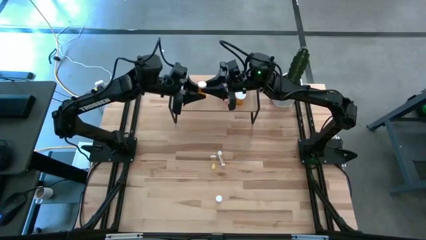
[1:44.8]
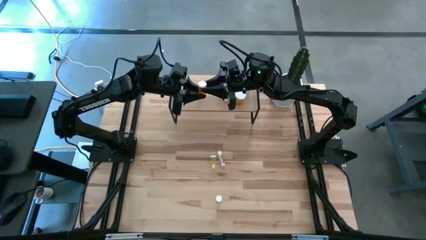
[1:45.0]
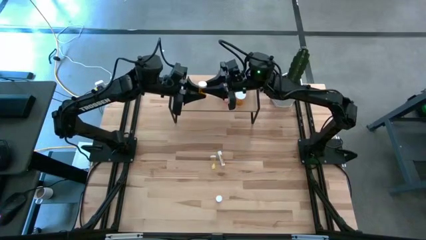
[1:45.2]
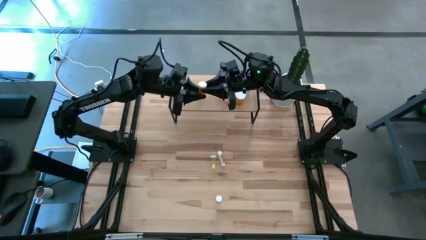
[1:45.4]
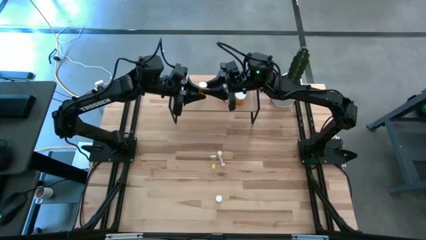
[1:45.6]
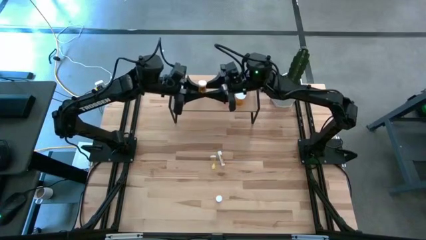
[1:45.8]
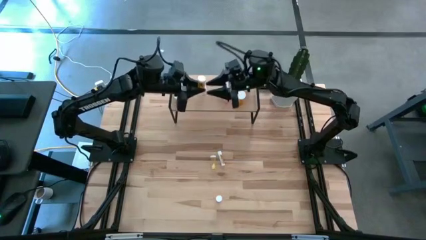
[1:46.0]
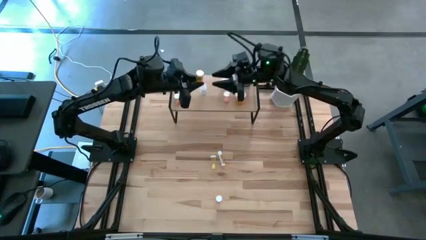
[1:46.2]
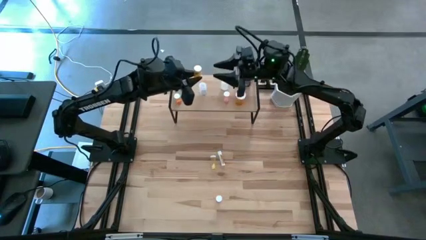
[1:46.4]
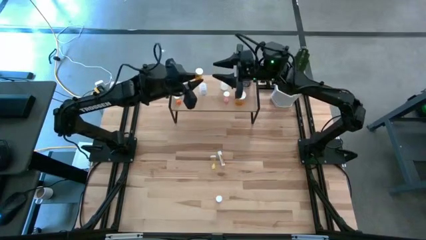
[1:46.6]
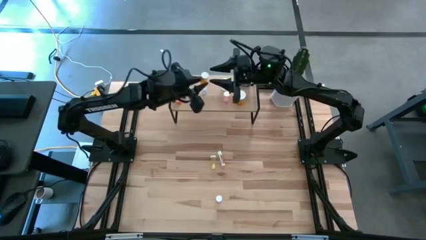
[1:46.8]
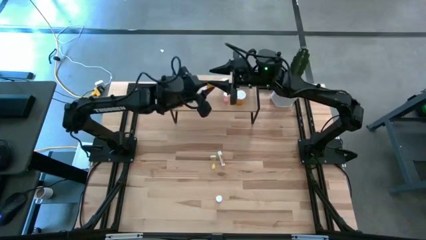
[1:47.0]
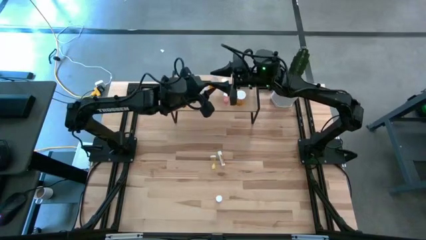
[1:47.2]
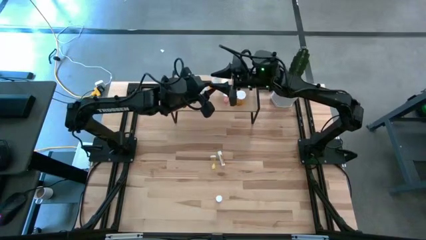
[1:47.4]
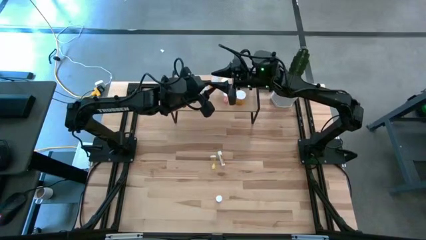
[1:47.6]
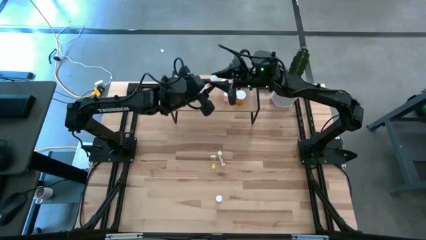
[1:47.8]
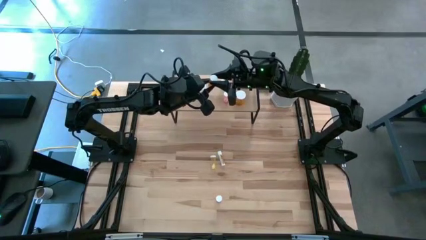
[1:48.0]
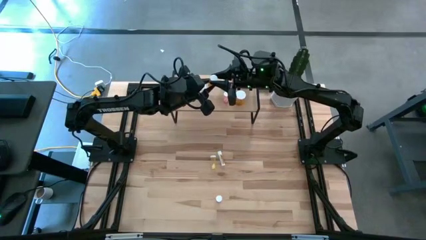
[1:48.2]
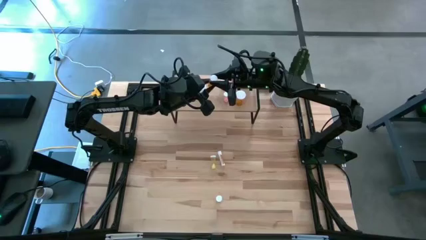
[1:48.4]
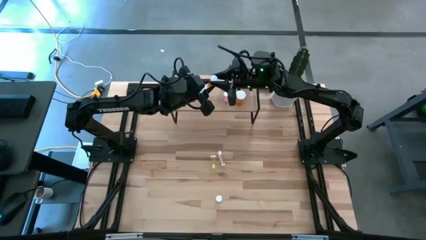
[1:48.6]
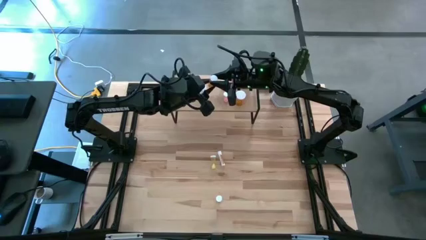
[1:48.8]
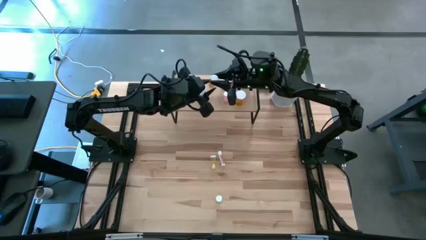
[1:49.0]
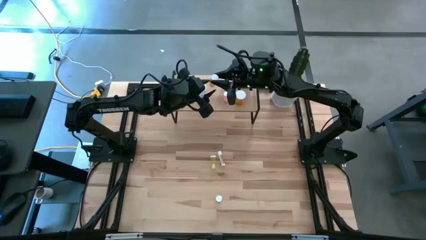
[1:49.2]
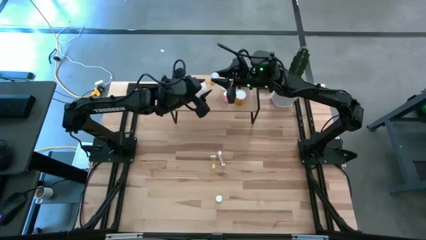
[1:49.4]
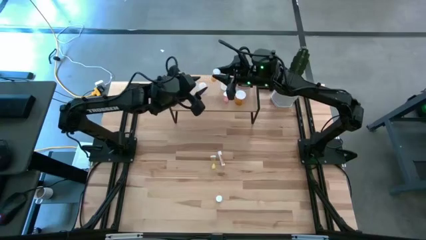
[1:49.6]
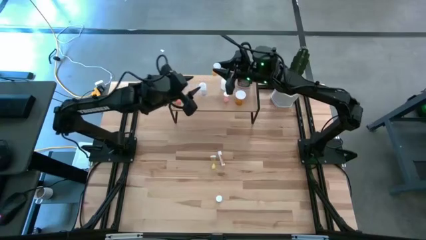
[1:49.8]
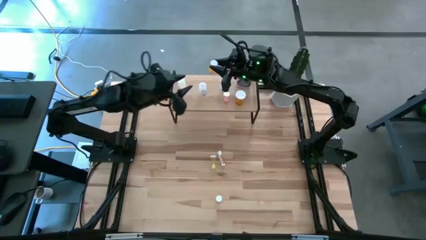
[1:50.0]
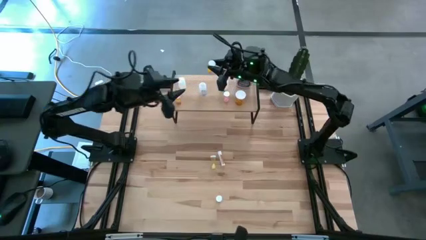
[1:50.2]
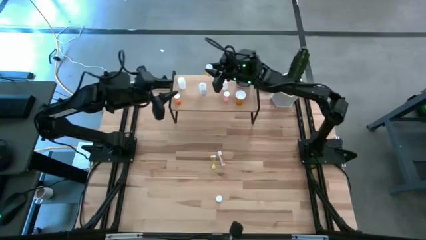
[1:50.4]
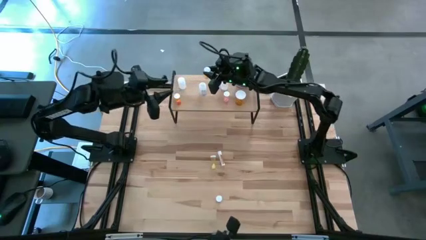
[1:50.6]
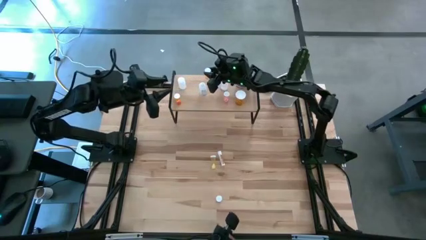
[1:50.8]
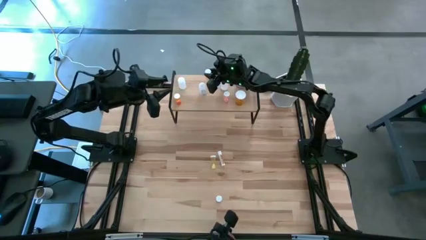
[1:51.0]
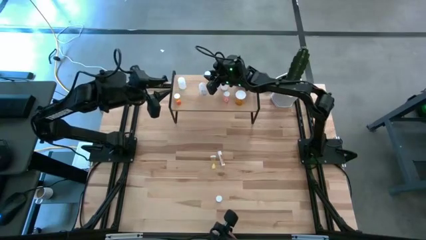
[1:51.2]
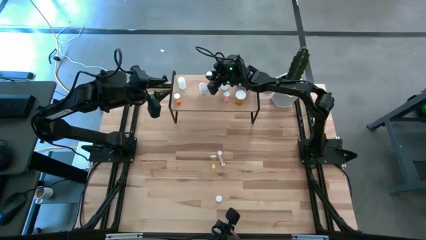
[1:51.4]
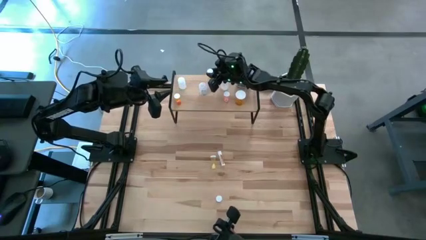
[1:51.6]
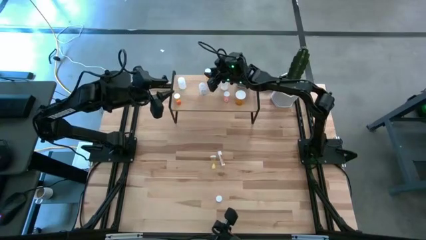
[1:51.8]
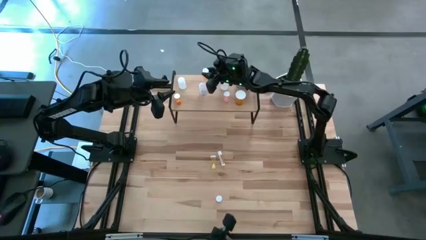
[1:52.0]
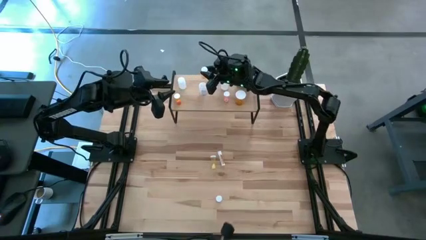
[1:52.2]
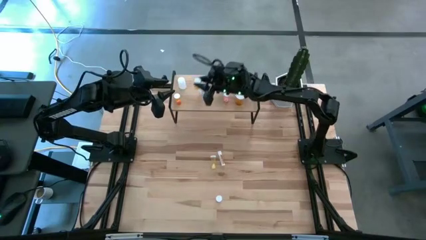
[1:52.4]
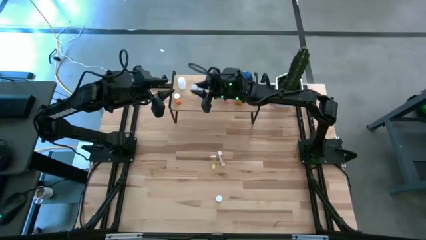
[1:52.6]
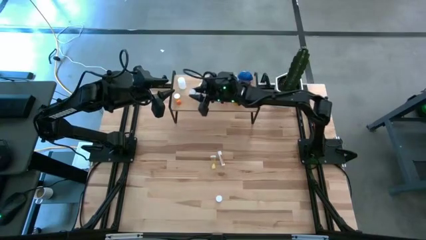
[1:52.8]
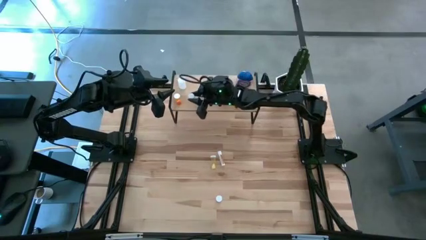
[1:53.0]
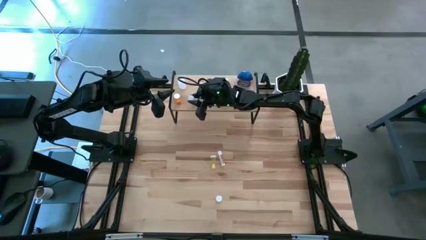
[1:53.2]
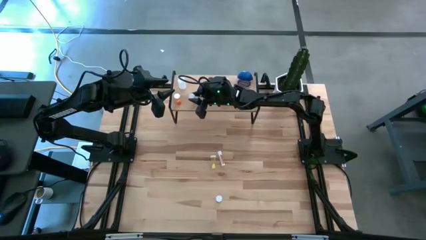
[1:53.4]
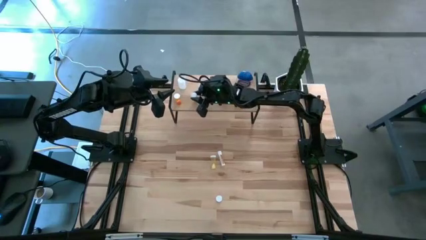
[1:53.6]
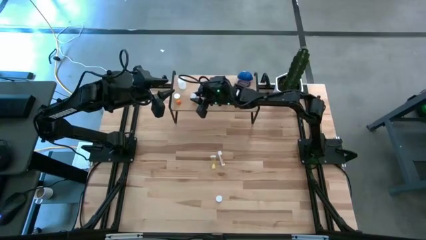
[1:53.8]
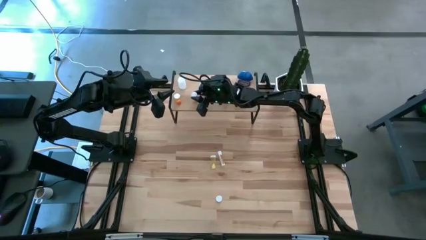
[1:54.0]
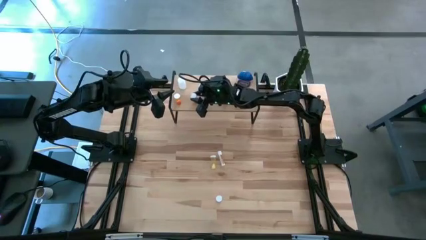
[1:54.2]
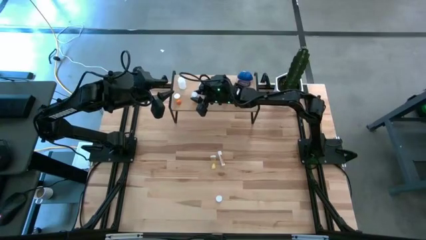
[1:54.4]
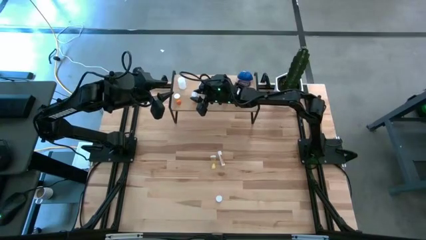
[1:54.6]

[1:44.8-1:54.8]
Task: Pick and place medicine bottles onto shelf by color
Put the orange pill bottle on the shelf

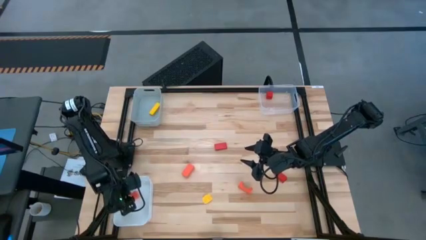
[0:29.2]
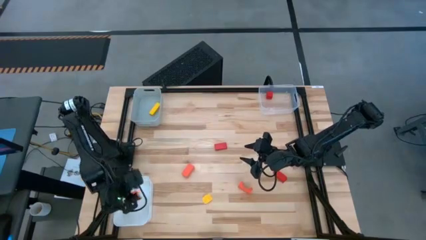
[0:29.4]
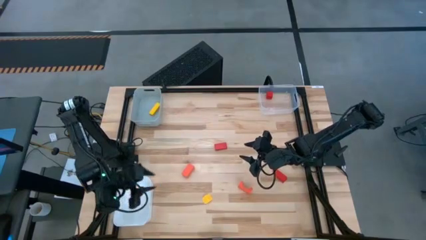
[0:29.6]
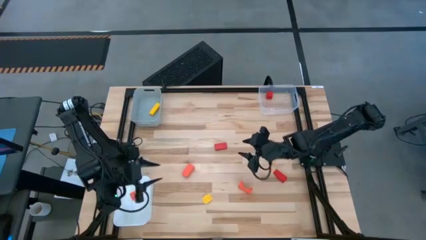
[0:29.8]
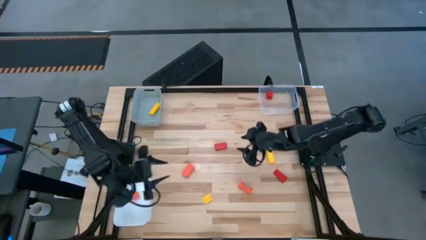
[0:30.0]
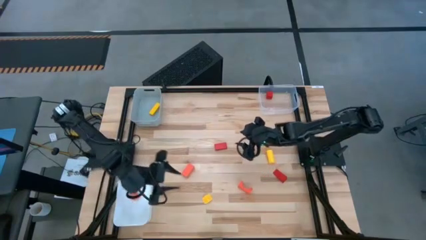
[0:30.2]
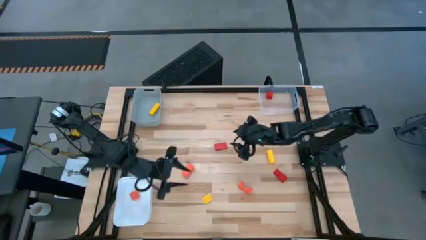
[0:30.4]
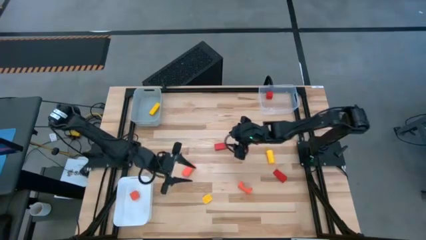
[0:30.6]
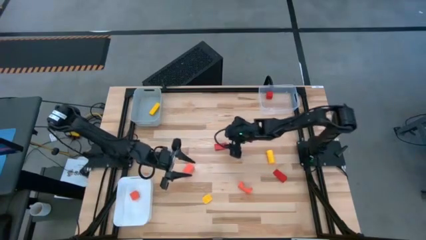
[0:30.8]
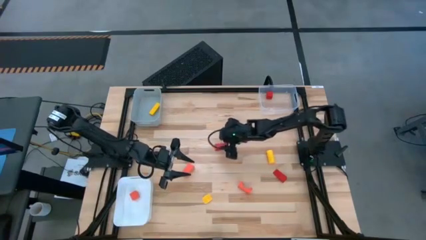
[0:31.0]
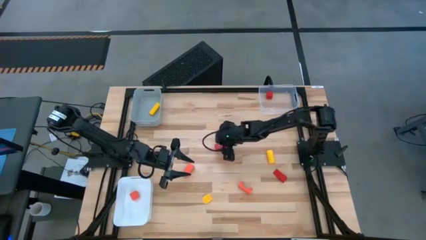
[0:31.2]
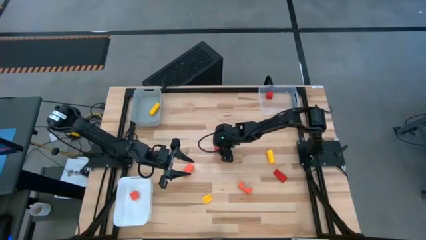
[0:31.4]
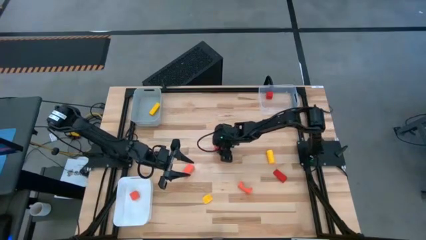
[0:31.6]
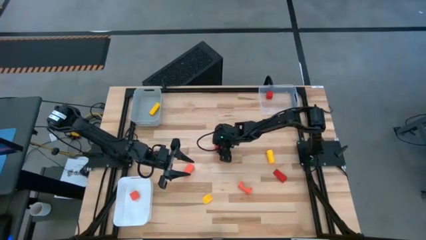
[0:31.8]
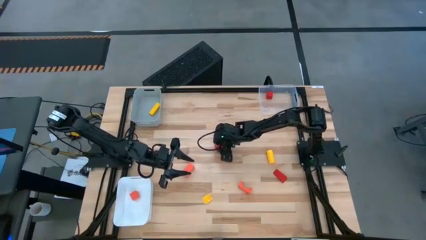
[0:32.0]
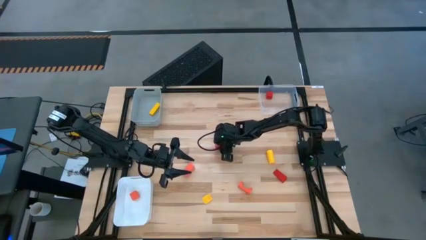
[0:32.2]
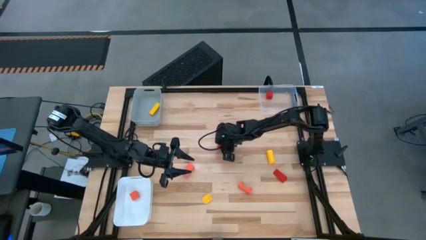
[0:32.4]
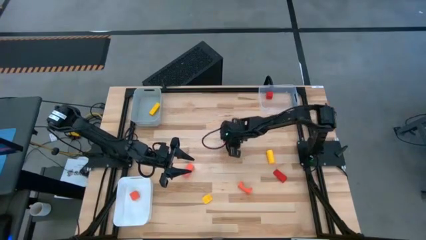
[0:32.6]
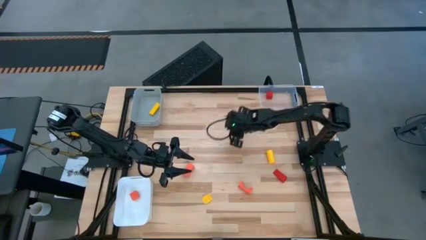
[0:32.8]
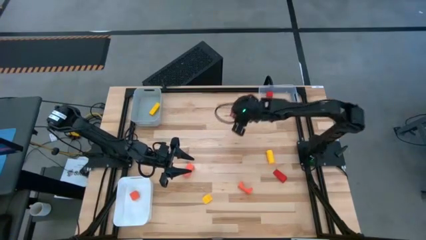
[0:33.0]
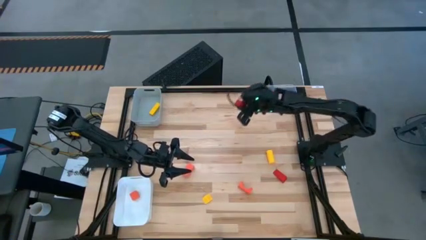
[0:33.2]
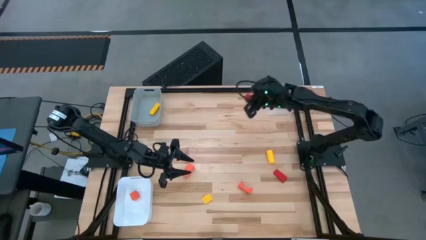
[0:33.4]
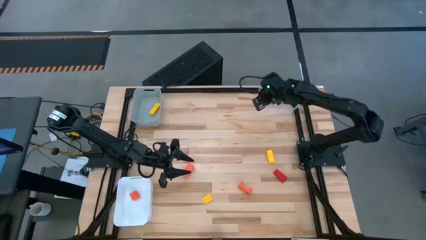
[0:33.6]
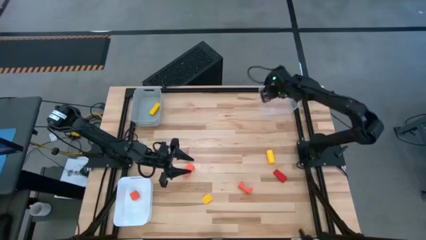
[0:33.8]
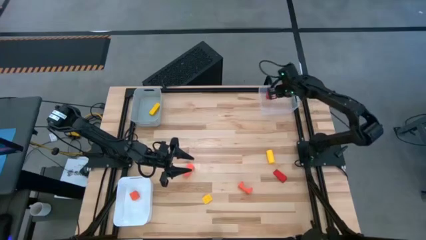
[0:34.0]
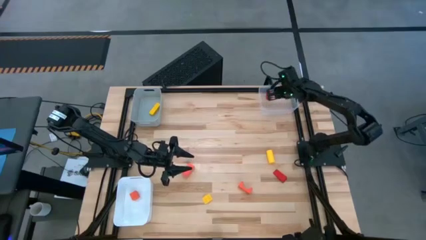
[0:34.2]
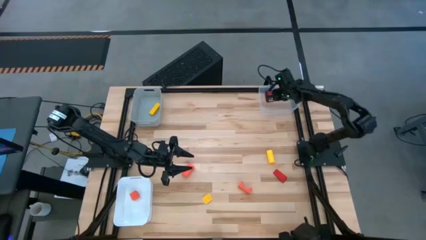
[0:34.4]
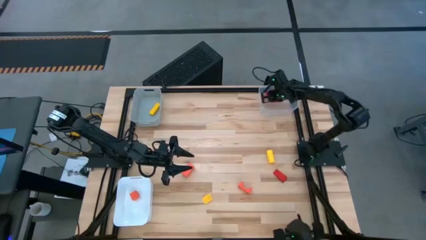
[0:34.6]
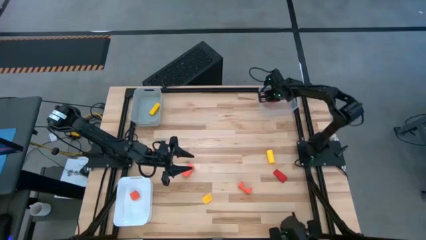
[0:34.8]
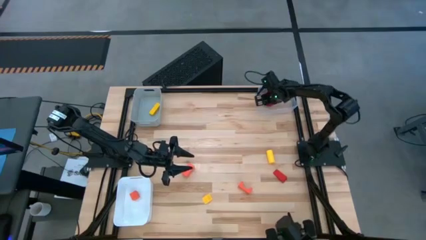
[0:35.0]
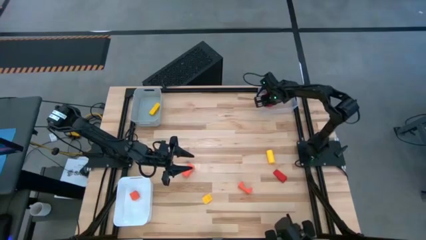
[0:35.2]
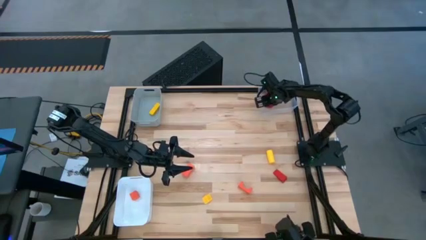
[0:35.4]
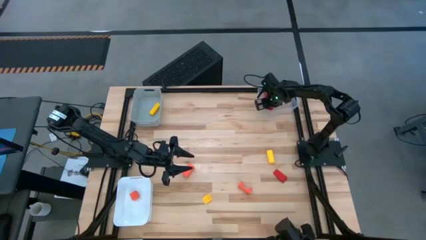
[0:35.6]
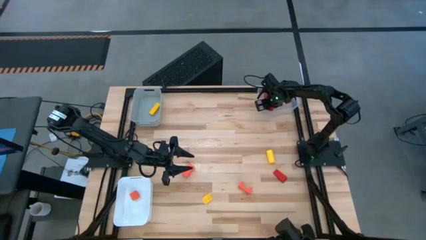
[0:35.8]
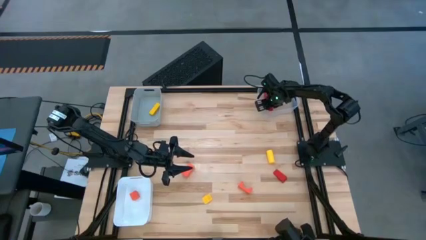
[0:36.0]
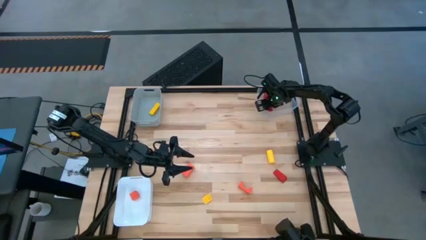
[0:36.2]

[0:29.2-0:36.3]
Task: Sort & place blocks by color
Put the top red block into the transparent bin
